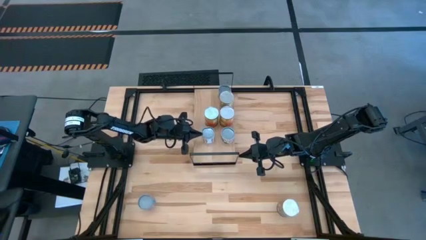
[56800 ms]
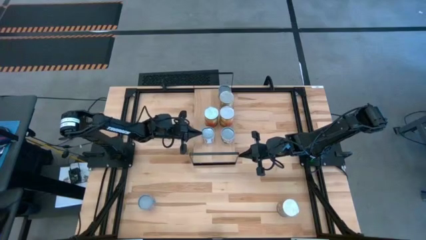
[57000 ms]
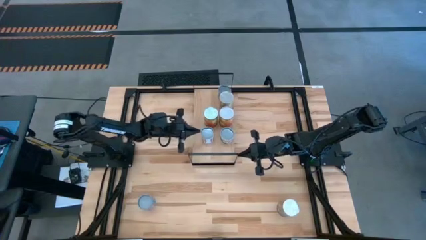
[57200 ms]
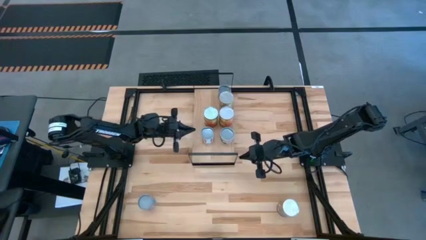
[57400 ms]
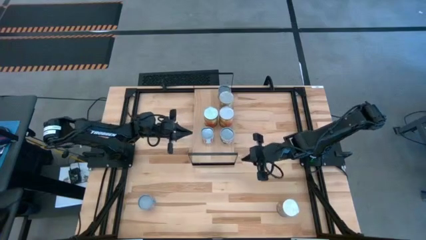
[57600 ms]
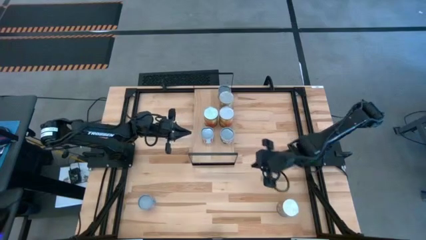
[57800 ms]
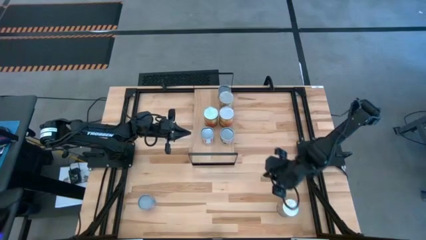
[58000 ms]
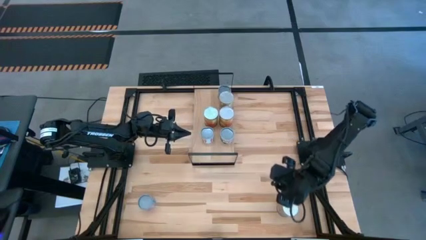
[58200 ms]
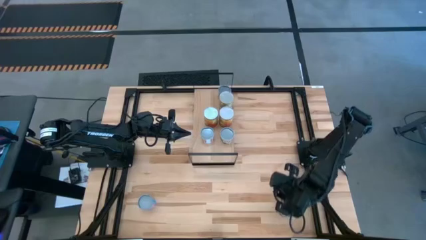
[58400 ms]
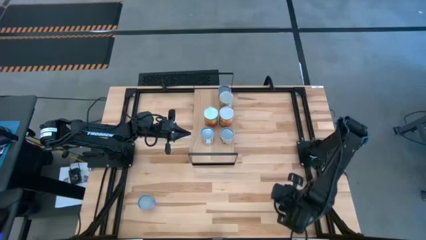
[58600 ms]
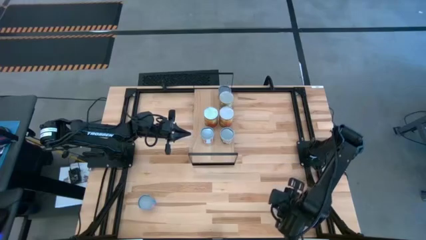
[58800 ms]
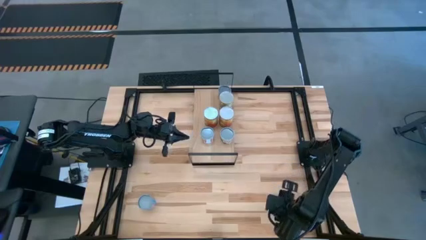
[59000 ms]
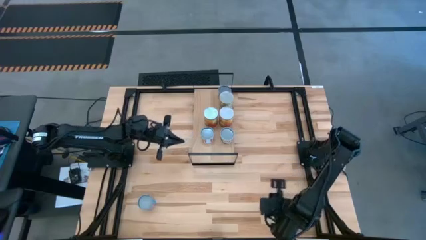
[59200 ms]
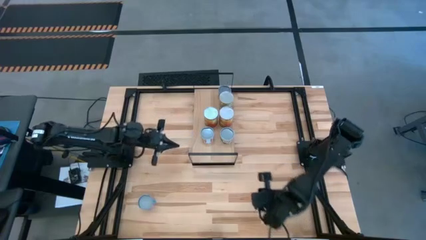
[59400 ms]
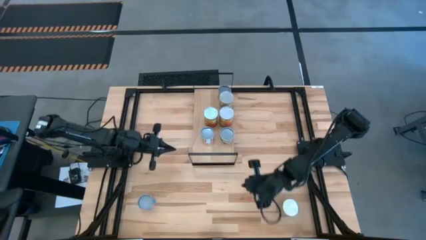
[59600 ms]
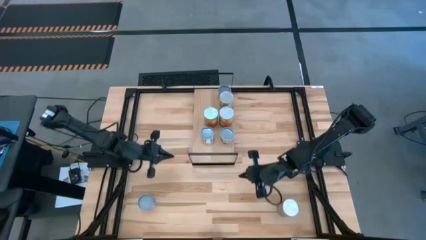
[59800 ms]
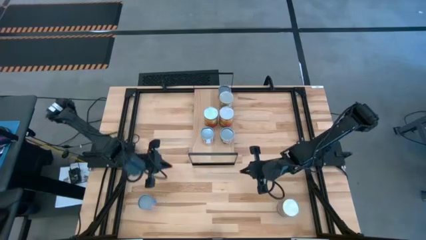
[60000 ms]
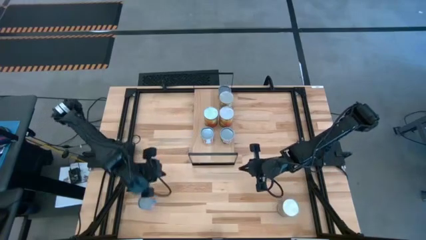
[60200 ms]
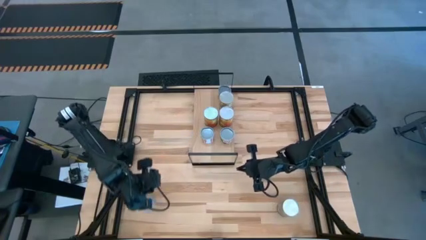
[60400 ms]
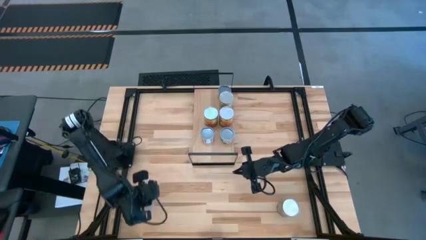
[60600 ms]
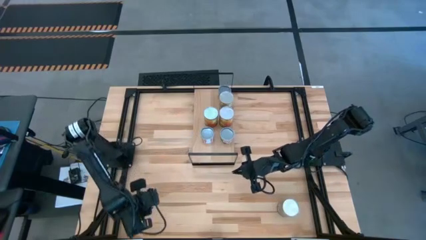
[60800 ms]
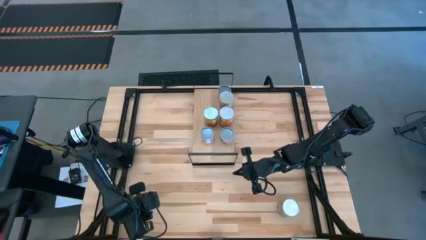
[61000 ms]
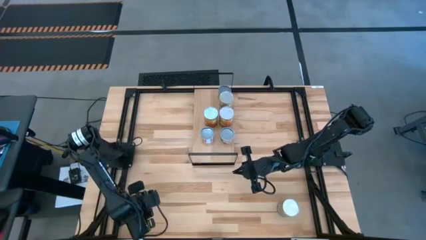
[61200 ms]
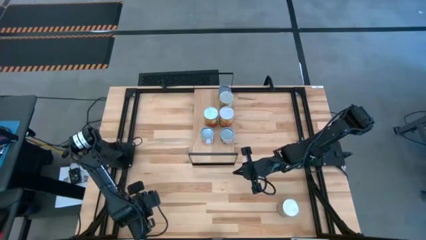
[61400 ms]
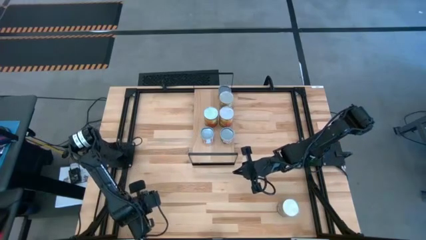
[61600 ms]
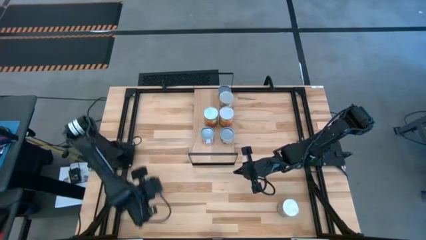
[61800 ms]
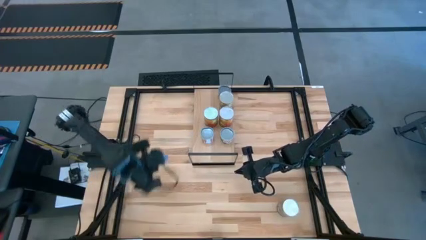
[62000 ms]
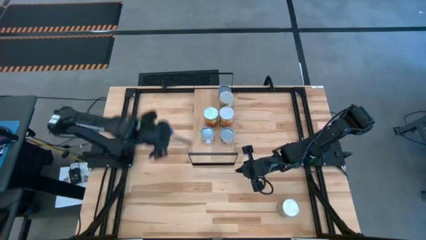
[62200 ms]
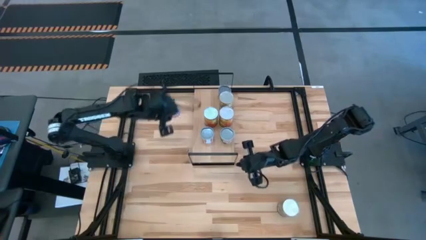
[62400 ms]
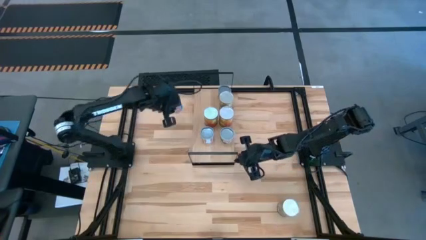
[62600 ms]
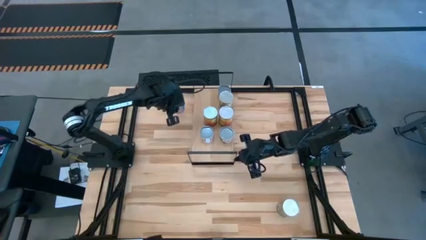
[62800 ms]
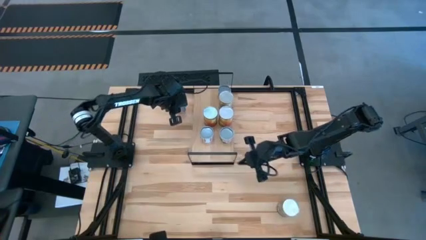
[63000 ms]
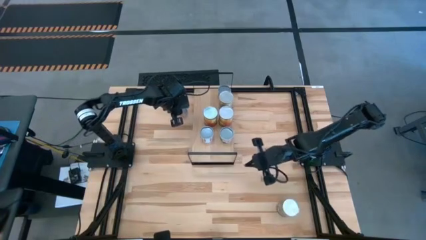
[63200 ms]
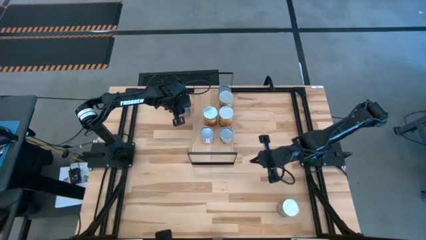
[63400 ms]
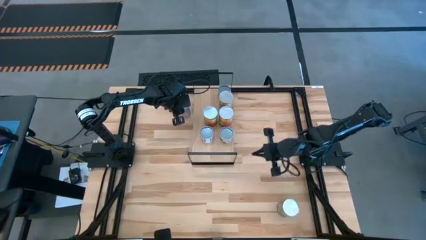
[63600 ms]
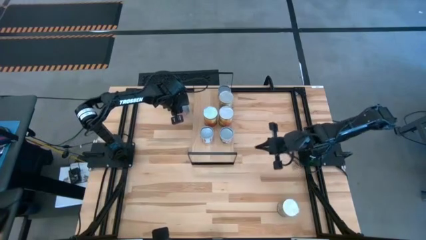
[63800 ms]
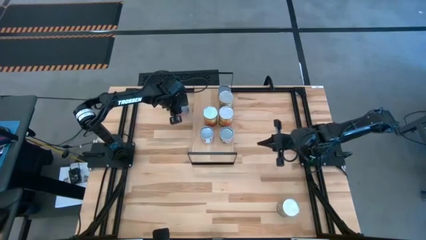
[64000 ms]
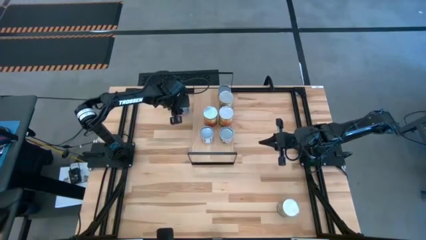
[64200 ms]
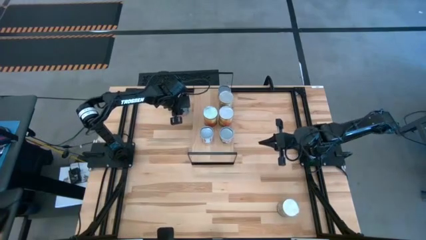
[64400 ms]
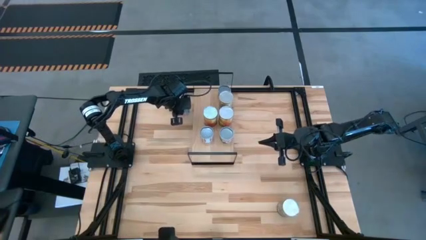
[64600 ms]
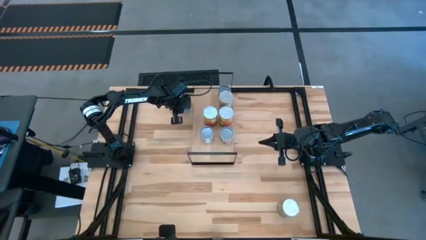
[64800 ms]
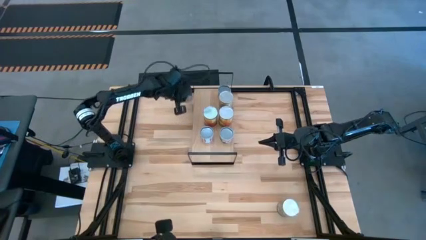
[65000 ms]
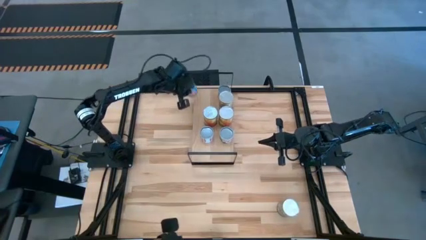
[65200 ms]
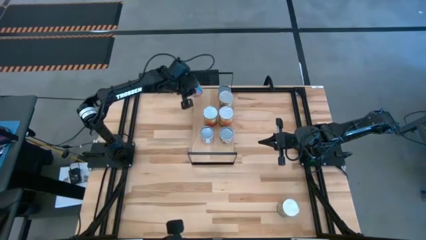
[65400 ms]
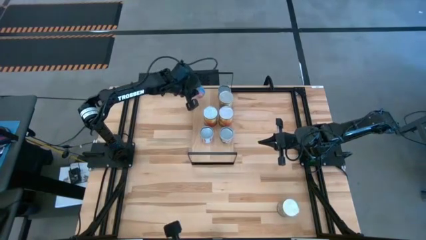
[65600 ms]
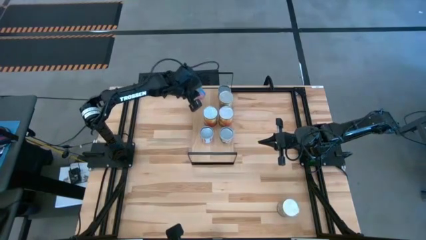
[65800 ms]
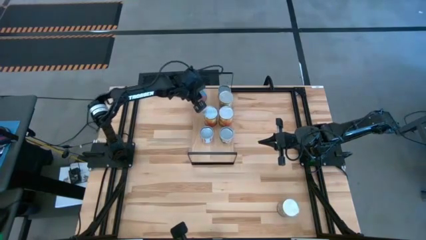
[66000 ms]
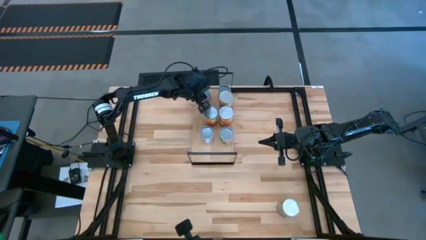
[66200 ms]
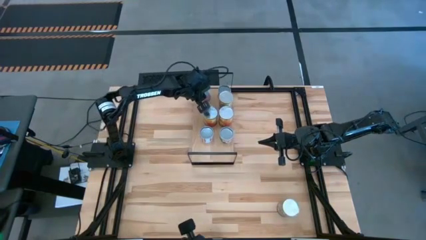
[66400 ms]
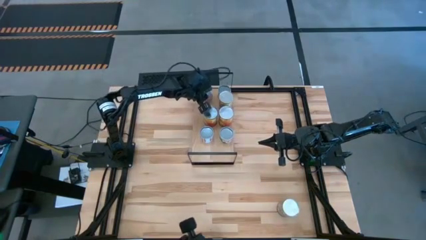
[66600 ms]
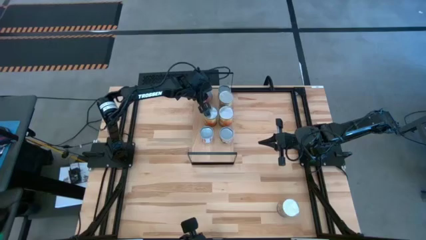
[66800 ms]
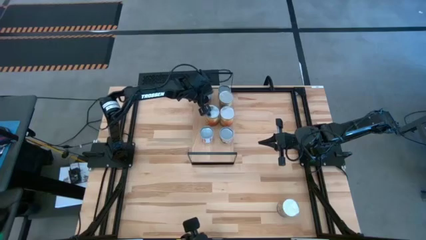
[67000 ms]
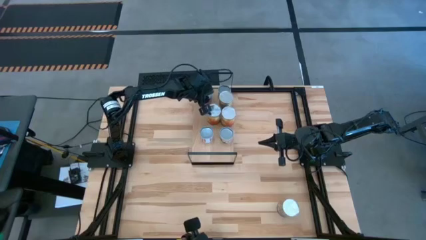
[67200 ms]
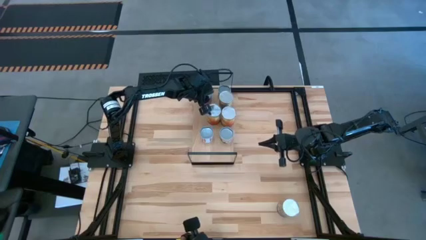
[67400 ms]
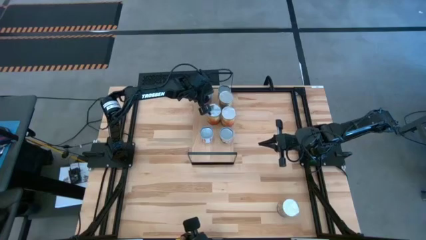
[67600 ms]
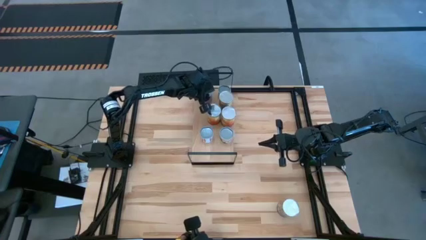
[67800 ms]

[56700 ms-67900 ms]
Task: Pick and place cans onto a shelf
Put the small blue can on the shelf aligned with the small dark green can

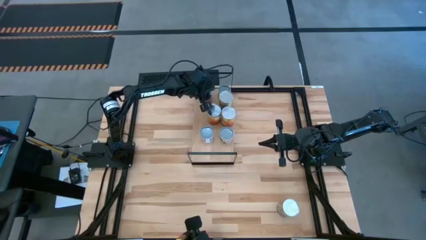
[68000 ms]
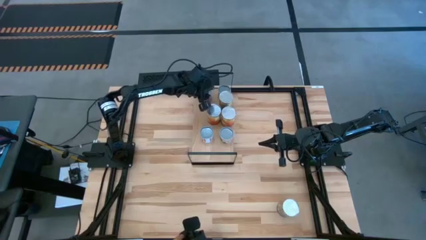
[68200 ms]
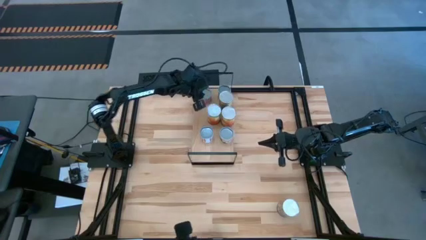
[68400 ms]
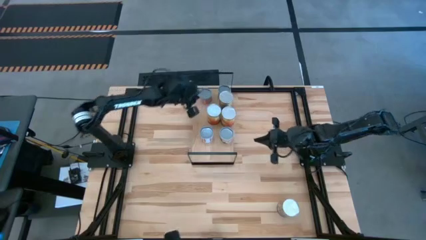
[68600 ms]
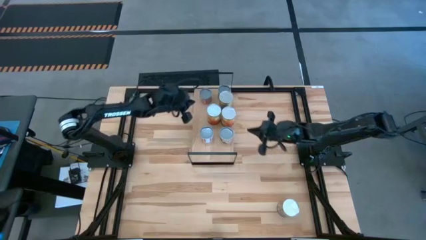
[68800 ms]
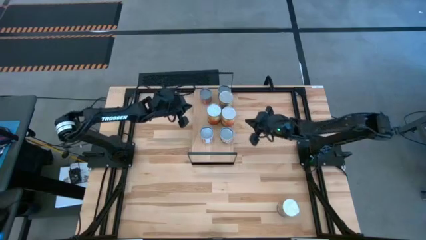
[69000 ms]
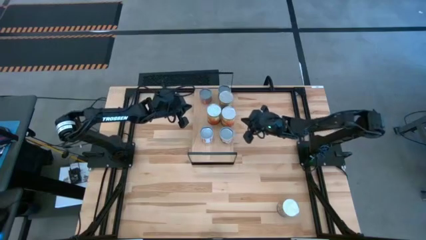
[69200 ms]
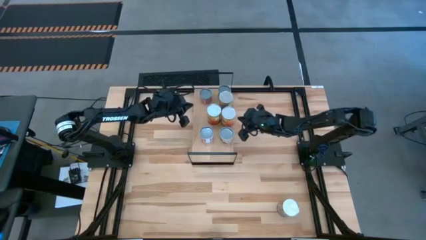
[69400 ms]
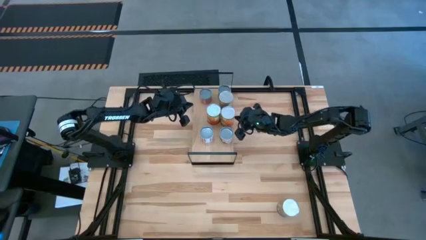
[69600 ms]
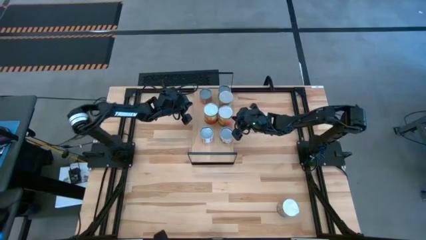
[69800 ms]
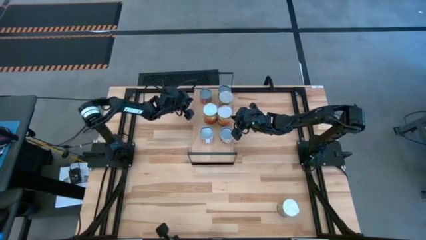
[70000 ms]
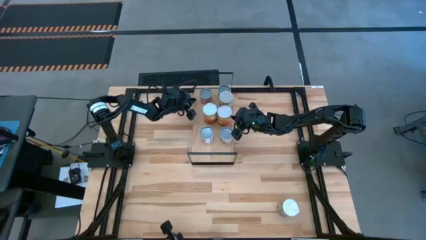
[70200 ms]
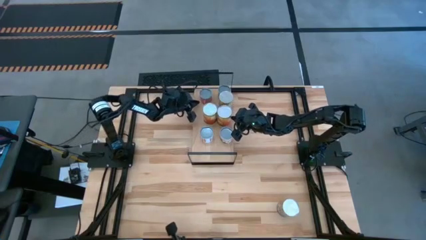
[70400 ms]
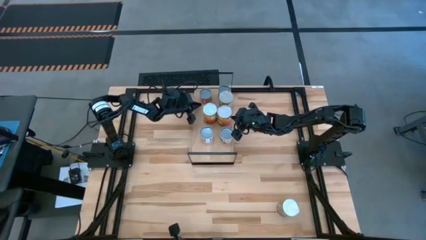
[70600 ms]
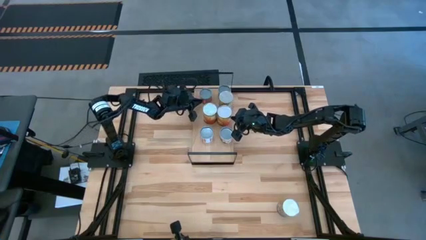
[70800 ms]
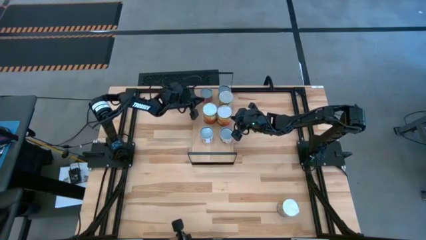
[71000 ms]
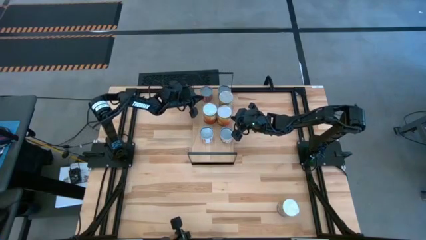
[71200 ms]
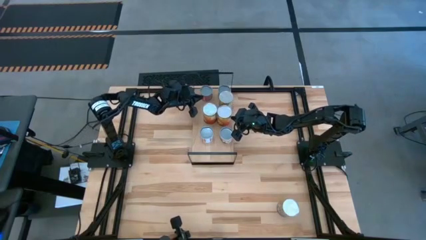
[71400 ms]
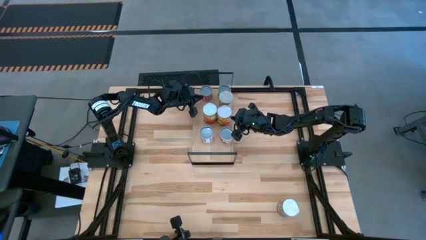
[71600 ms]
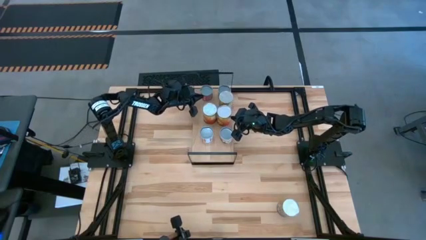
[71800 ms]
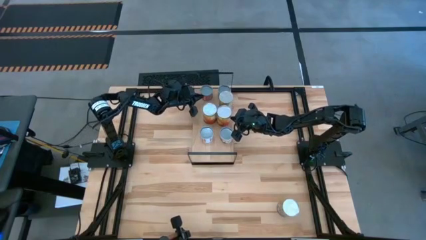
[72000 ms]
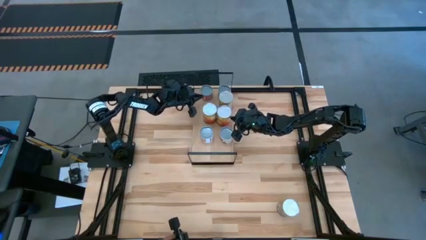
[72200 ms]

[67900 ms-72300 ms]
Adjust the large orange cans on the shelf
